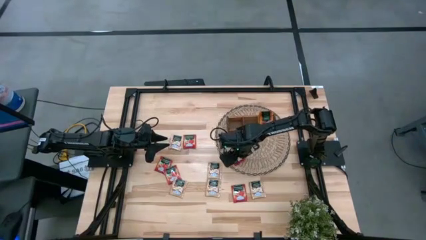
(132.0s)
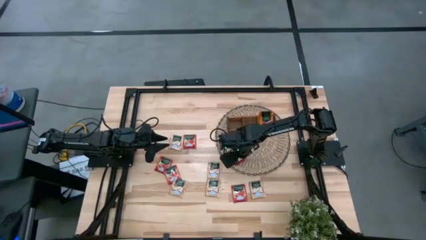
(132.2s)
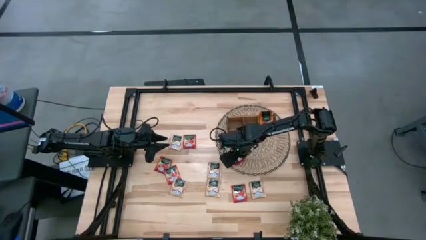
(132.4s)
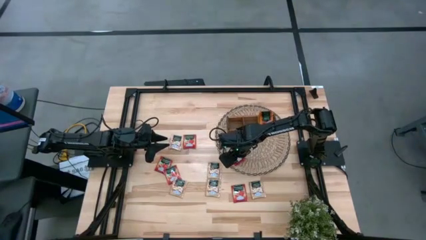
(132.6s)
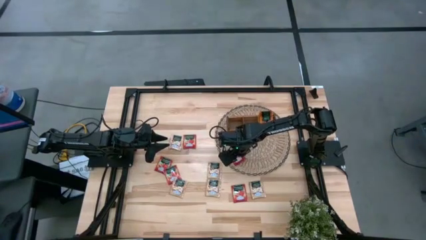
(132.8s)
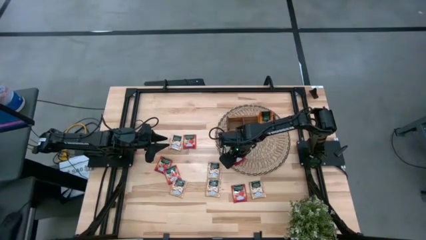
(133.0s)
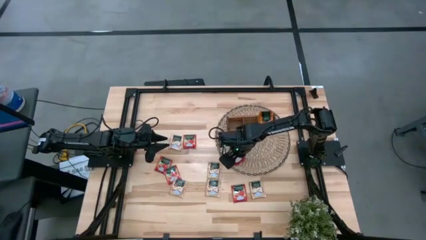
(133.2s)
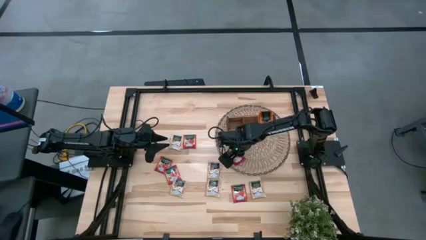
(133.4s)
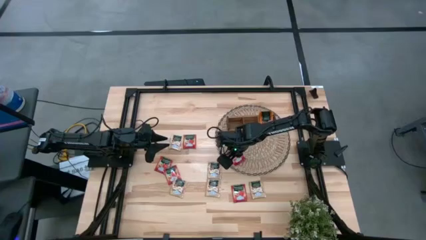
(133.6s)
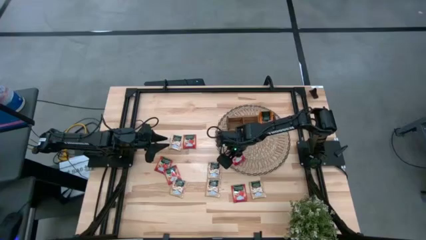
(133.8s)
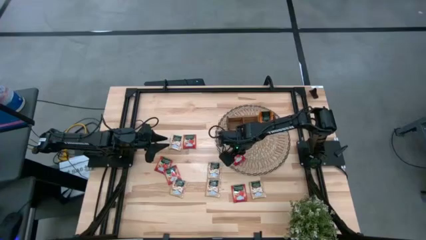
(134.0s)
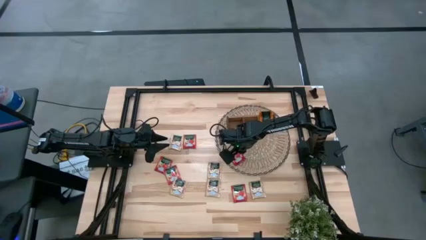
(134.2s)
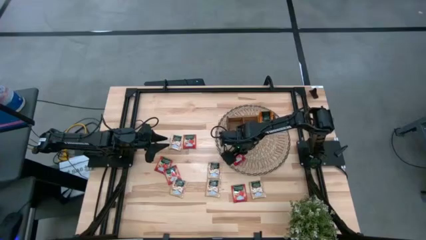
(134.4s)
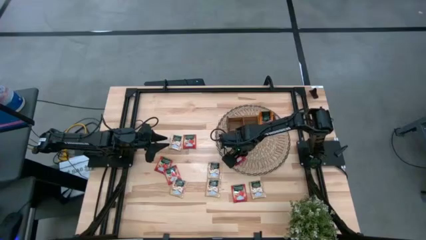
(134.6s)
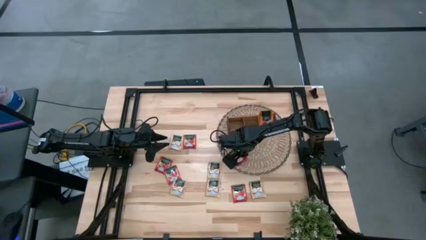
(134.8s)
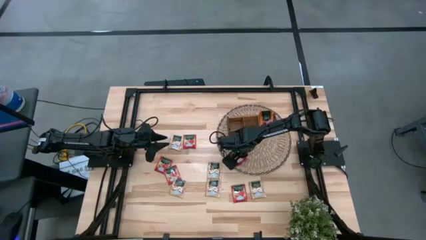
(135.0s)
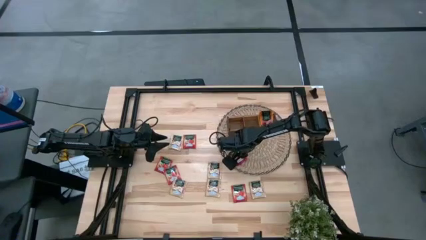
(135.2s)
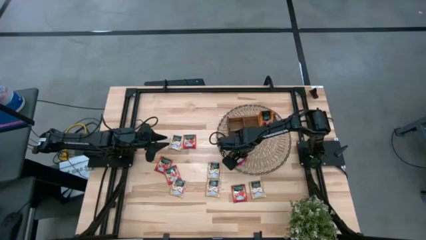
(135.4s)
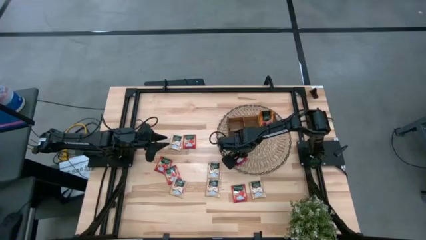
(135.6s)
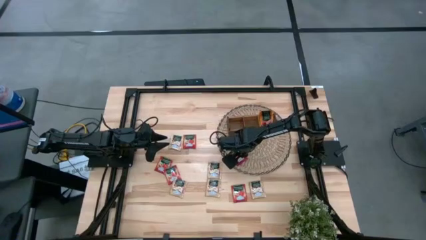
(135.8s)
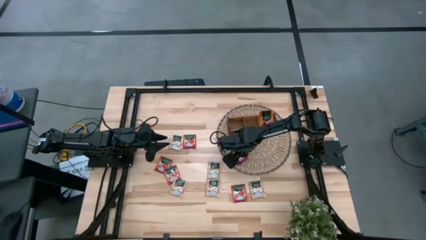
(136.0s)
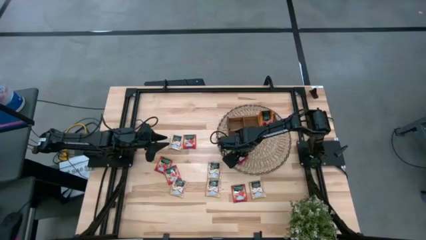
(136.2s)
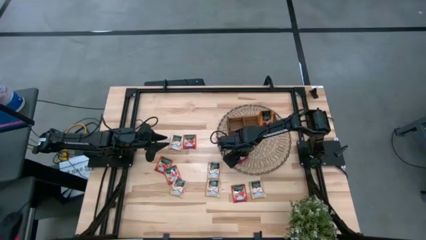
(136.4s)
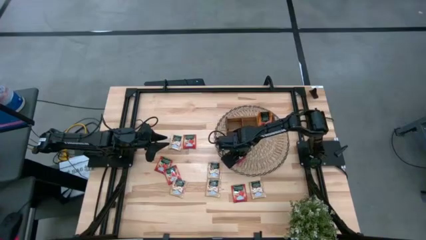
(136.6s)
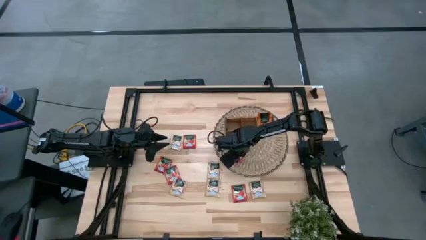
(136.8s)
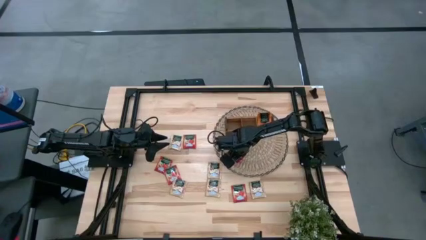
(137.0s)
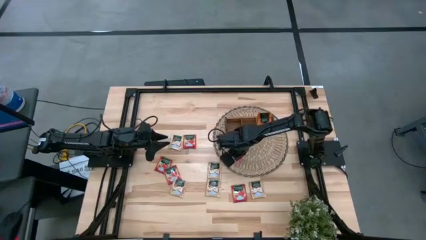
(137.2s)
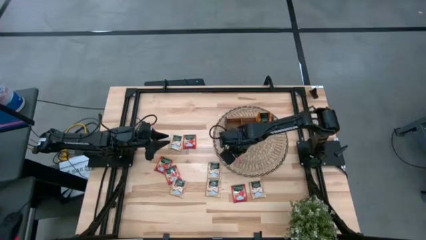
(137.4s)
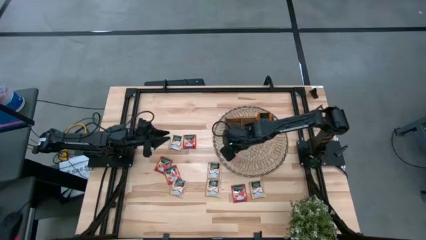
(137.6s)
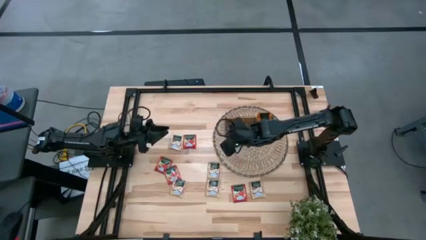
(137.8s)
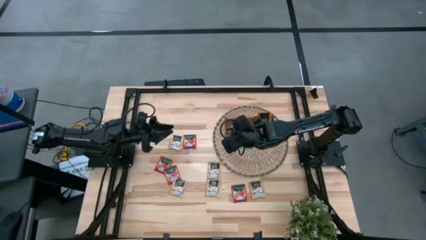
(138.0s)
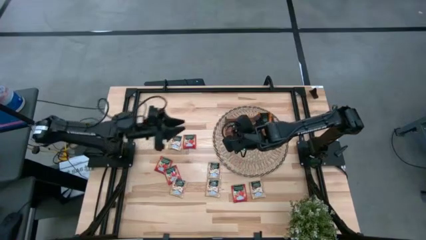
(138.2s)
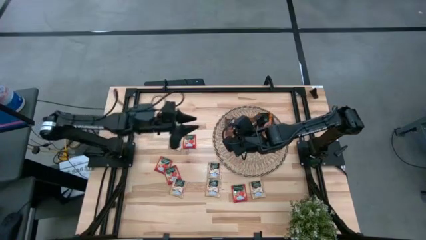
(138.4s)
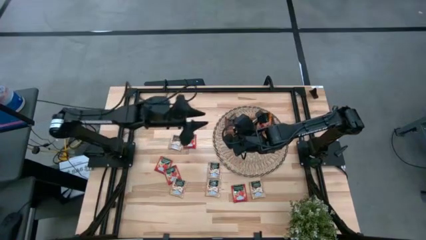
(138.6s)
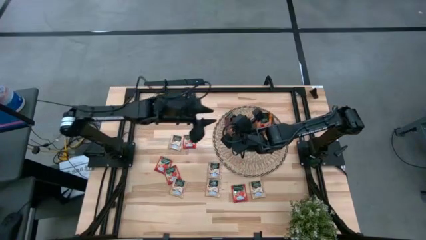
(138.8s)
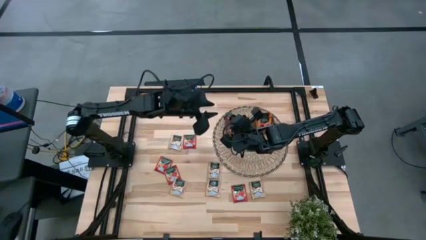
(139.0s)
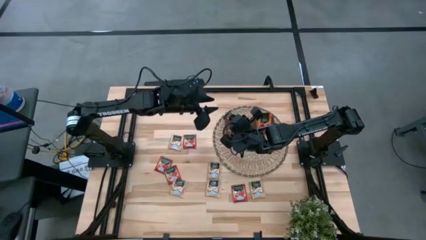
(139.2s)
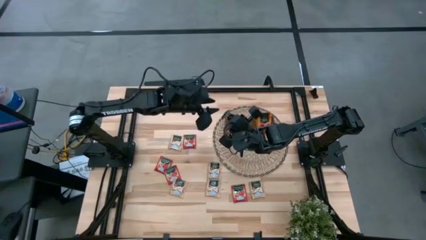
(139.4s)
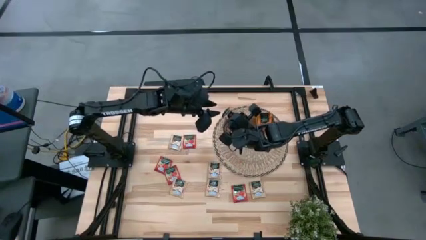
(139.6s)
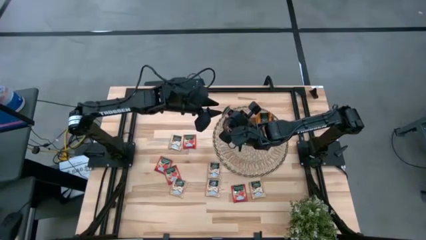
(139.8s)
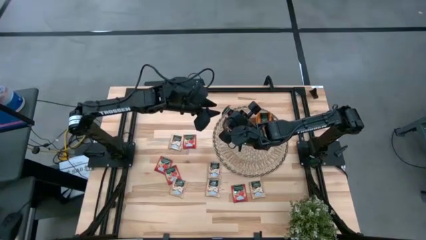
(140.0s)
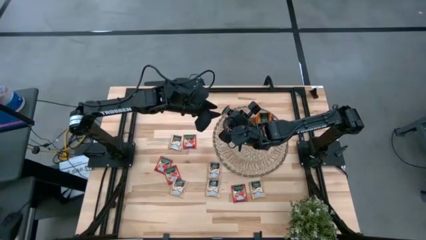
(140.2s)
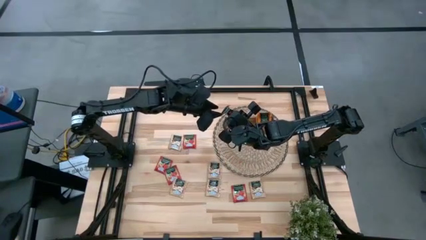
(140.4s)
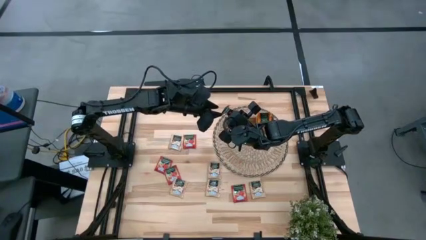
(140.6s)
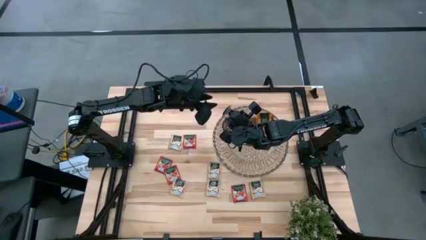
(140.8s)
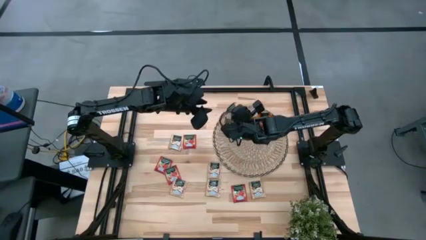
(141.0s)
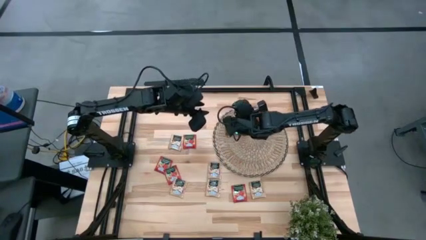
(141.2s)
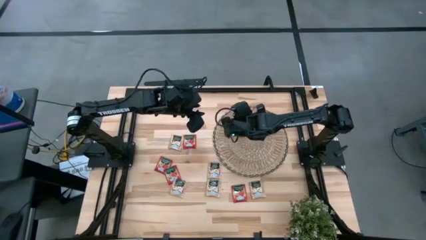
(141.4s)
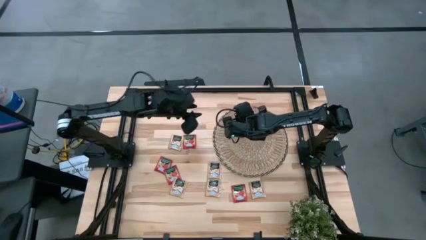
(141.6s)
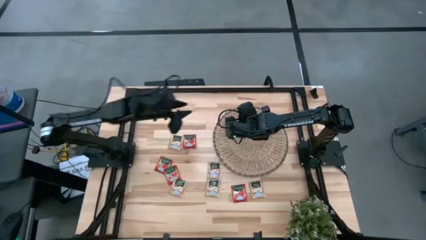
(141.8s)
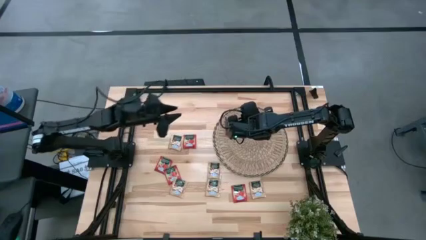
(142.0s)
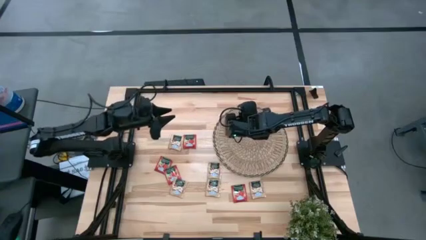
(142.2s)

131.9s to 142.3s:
Task: Pick & Place Tea
Put the red tea pack into the middle compartment of the brown organizer
